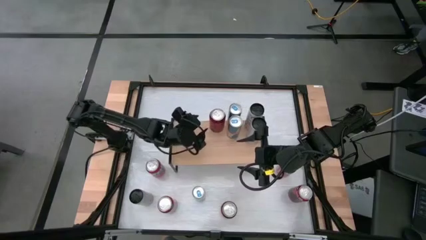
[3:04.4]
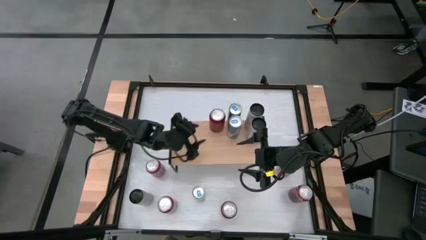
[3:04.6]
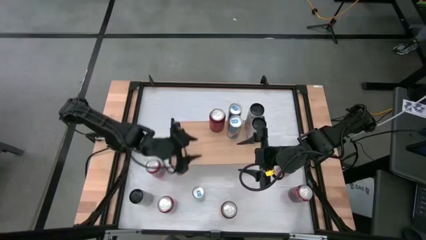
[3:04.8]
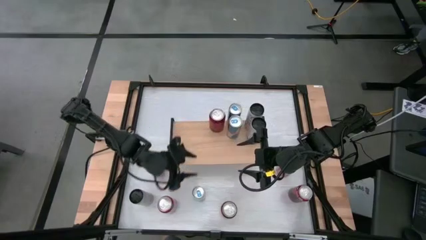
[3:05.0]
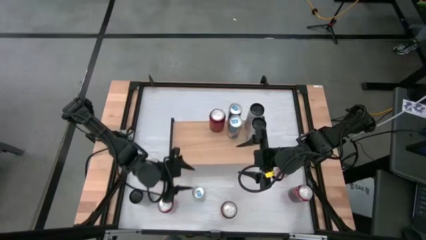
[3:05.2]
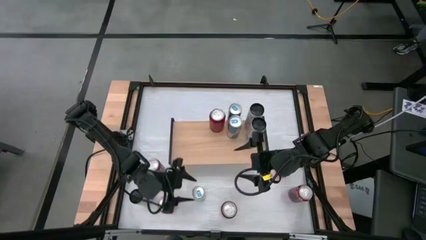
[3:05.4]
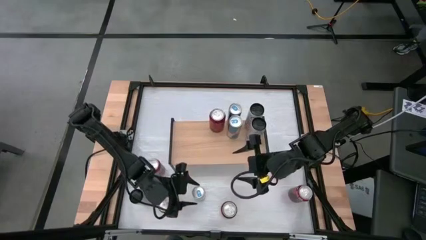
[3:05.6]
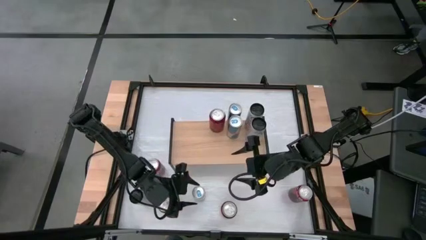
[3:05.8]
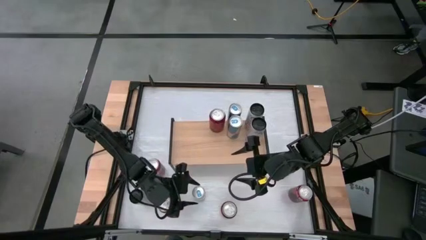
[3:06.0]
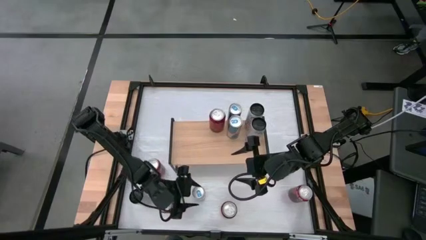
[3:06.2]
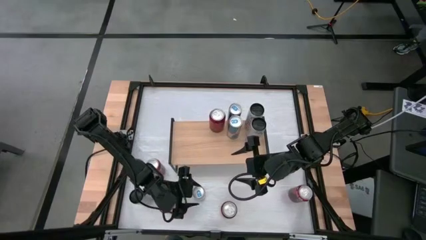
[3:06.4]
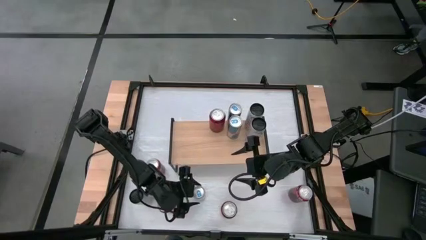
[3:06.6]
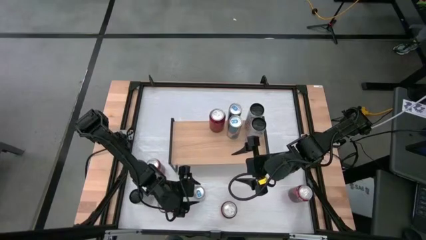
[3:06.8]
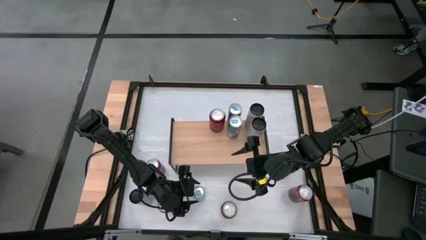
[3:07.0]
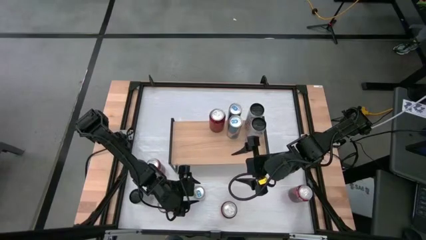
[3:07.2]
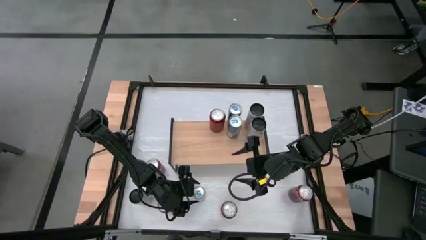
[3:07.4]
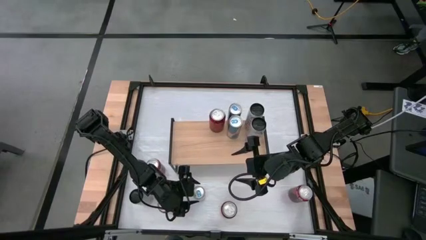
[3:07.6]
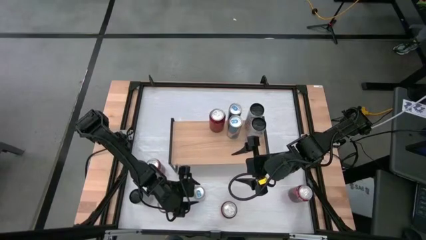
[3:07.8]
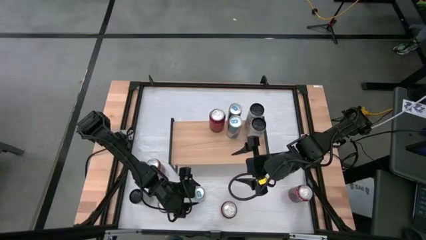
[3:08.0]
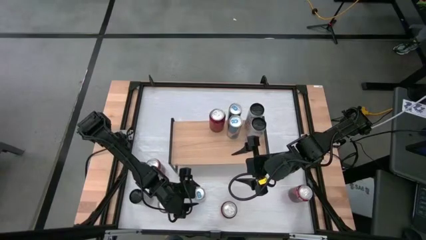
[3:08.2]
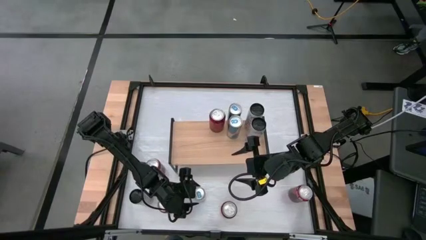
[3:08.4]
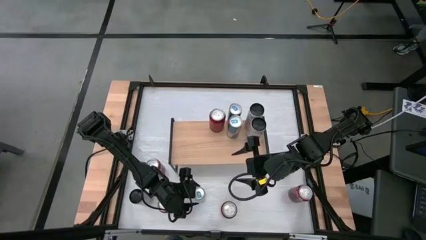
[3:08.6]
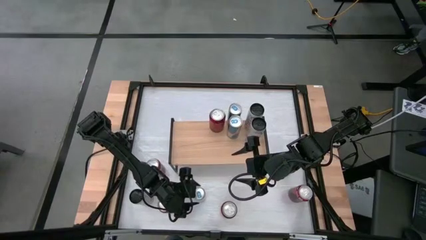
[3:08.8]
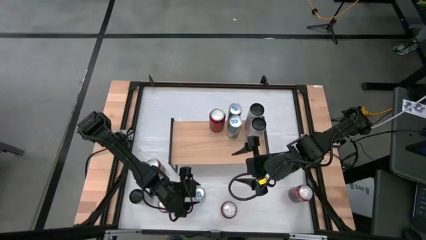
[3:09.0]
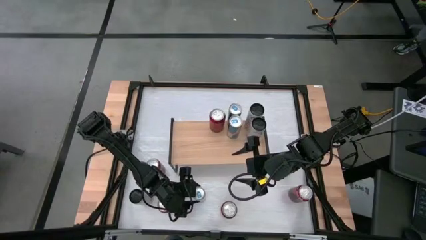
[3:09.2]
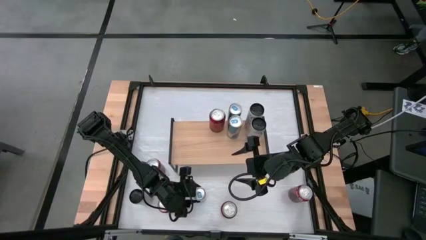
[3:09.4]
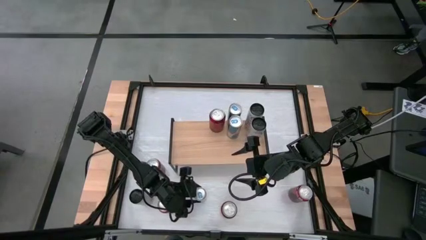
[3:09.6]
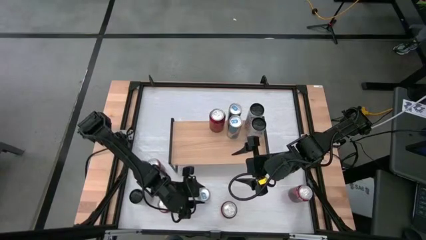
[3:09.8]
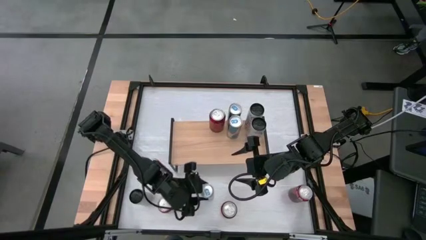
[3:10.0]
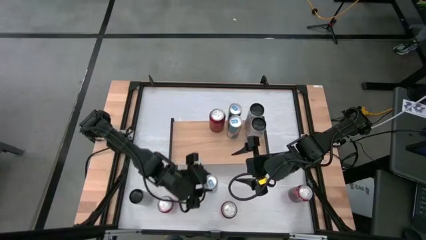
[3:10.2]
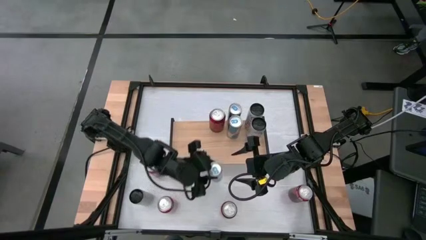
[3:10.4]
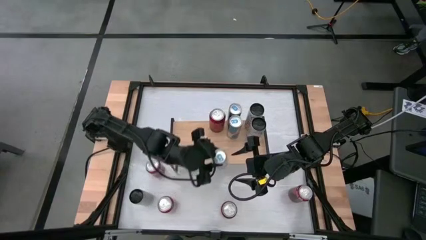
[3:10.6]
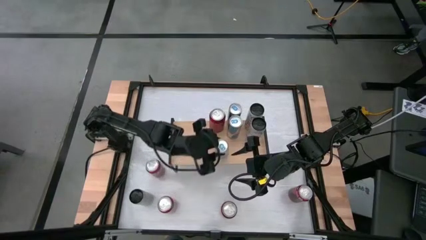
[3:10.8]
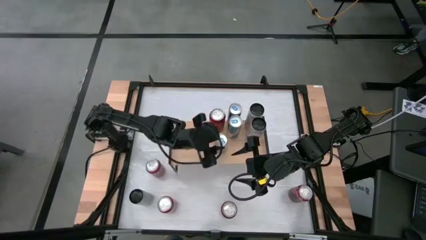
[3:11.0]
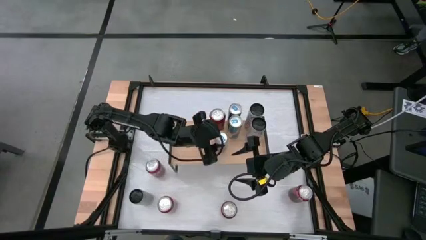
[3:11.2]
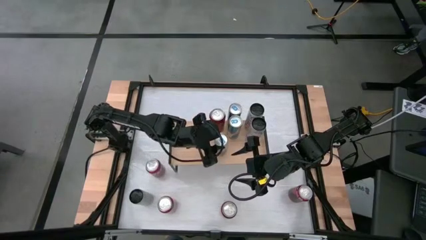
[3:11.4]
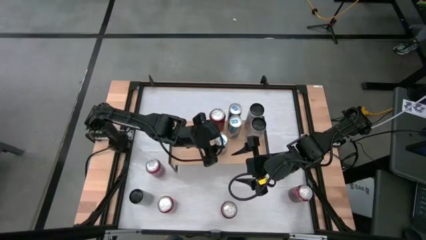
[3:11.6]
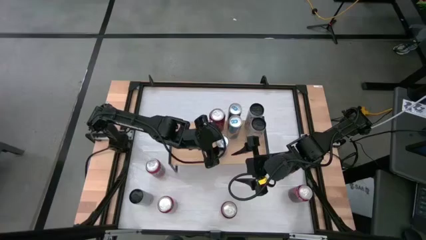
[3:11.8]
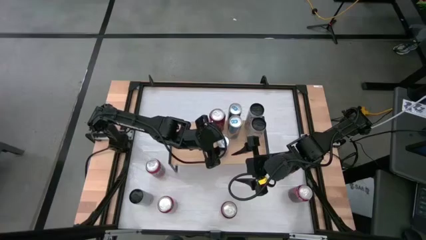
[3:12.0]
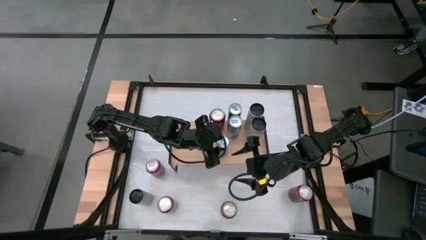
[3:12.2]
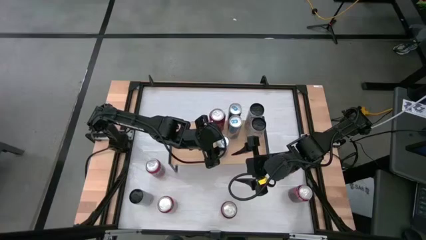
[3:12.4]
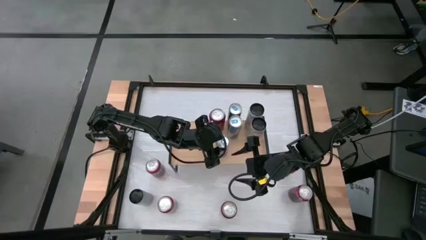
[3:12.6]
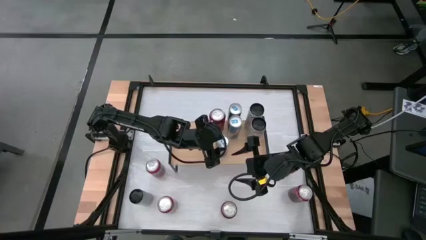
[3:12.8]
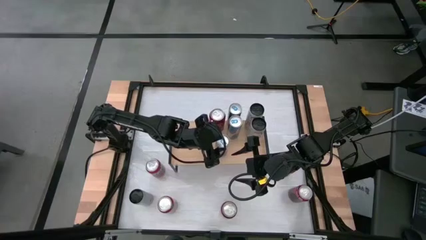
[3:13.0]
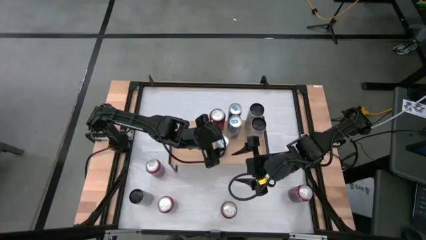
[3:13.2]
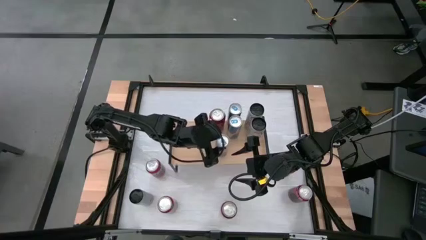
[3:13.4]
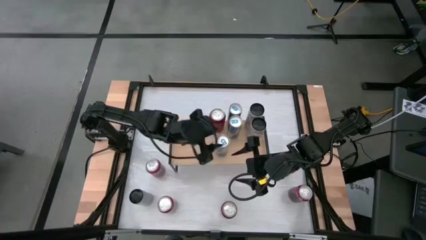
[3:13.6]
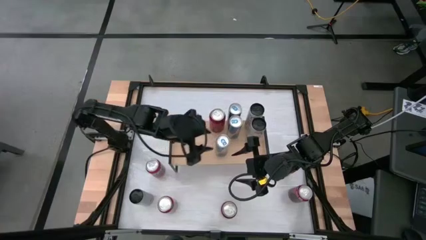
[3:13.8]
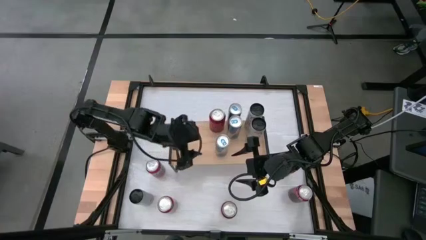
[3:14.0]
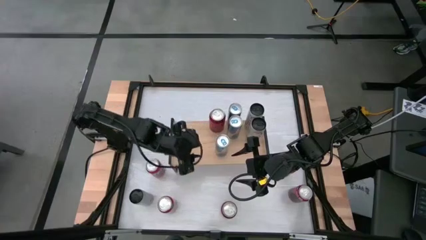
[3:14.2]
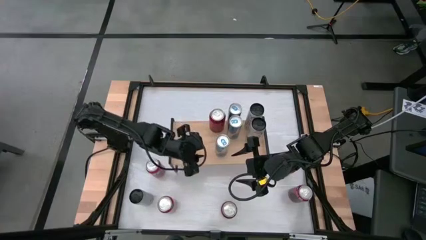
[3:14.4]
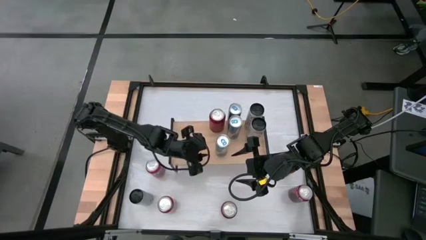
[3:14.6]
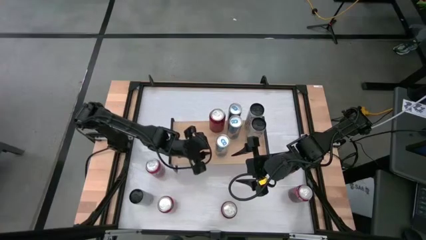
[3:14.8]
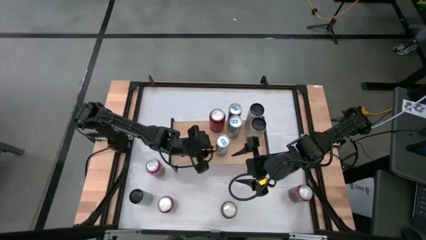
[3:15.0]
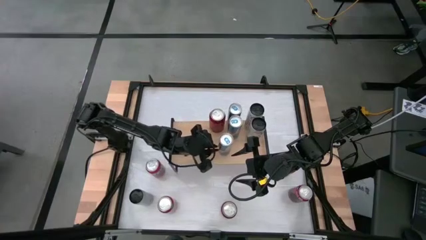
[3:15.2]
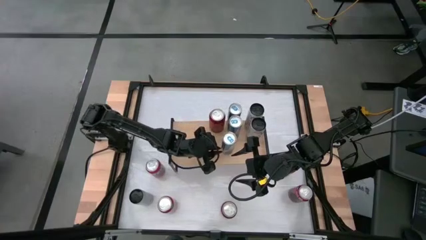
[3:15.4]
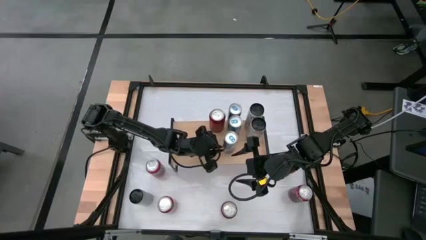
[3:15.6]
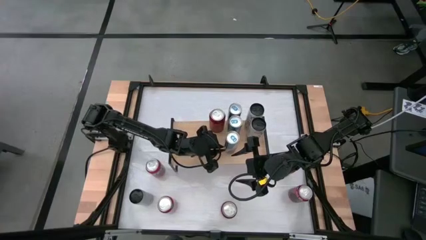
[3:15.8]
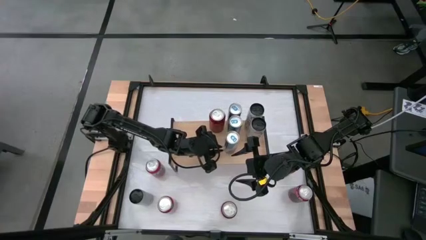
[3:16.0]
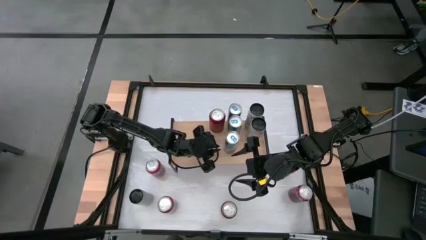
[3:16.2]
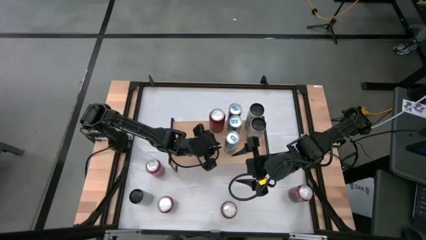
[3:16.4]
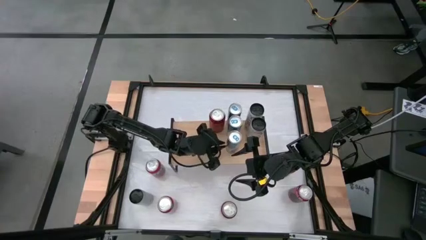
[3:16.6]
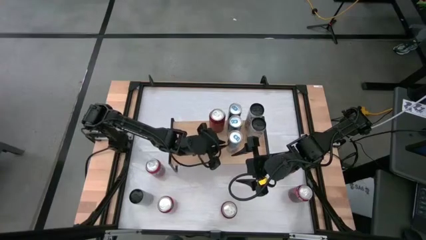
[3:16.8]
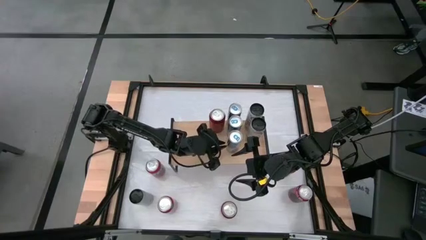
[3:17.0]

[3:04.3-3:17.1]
Task: Place canned beverage on shelf
Put the blue soda can on the shelf aligned with the other blue soda cans

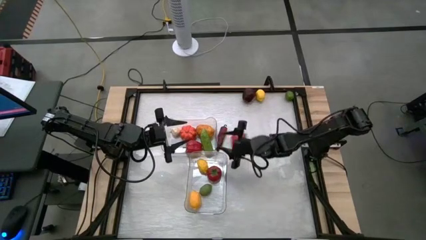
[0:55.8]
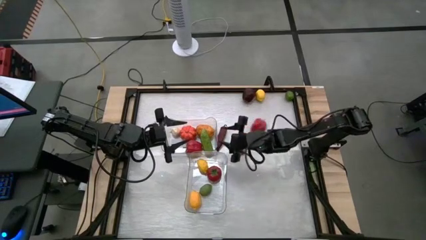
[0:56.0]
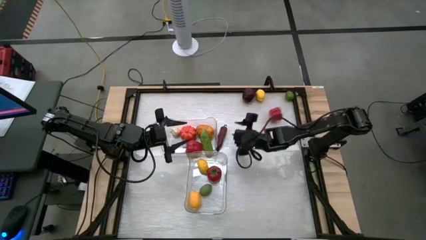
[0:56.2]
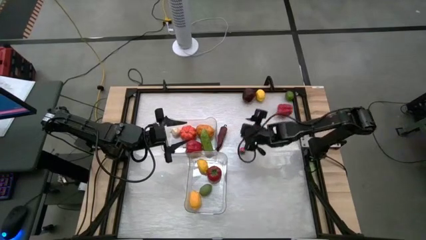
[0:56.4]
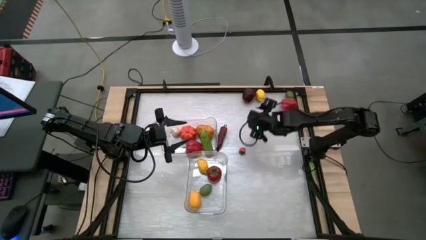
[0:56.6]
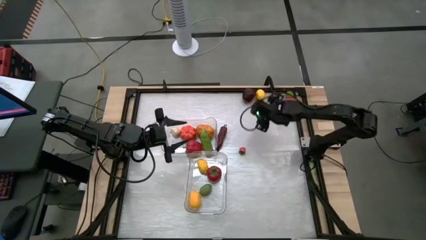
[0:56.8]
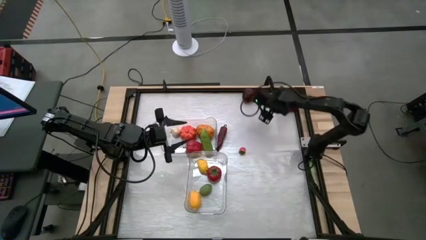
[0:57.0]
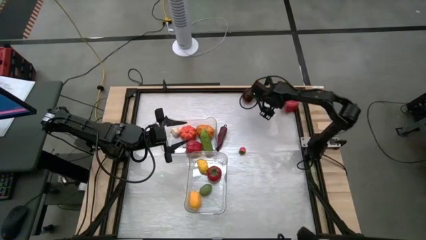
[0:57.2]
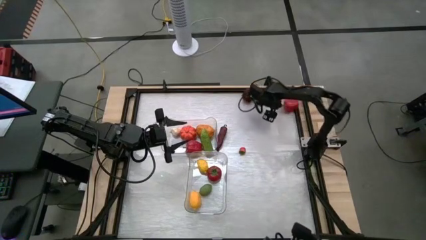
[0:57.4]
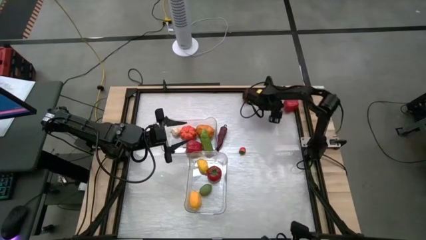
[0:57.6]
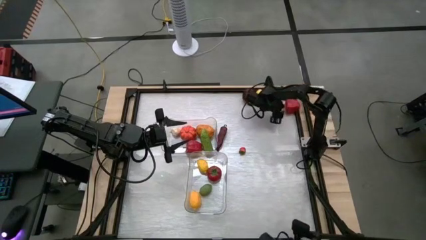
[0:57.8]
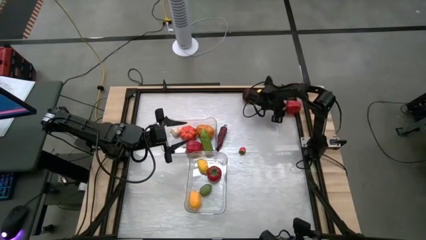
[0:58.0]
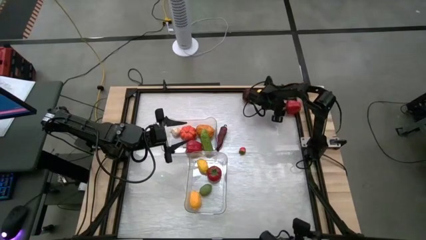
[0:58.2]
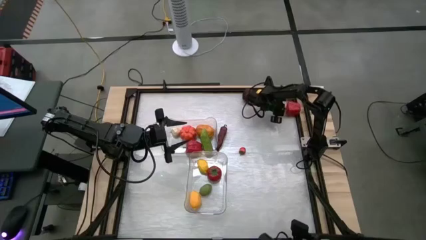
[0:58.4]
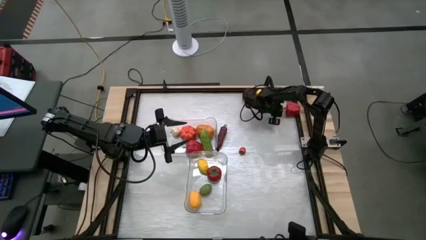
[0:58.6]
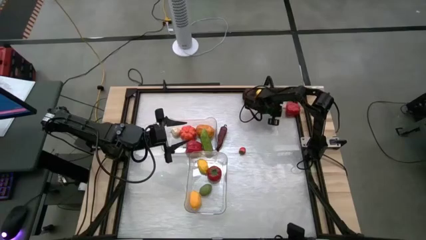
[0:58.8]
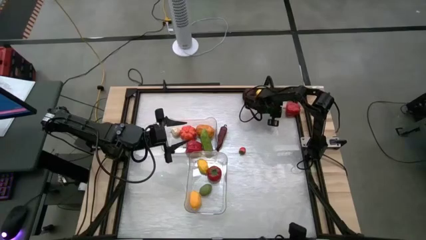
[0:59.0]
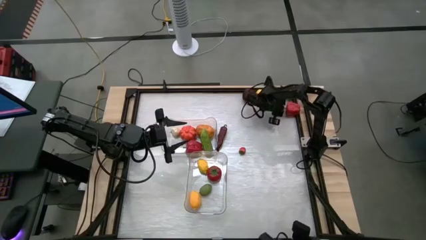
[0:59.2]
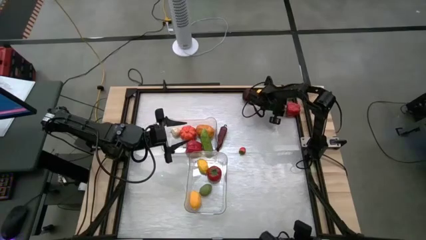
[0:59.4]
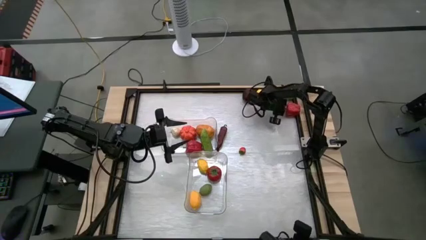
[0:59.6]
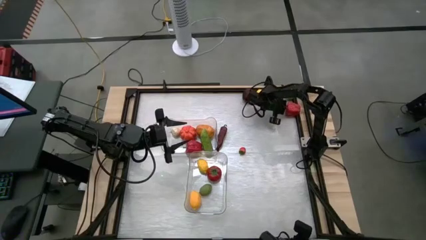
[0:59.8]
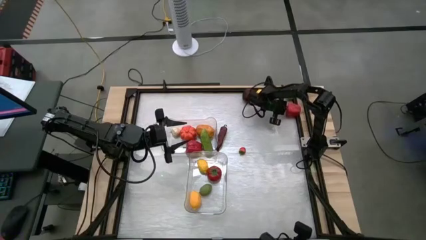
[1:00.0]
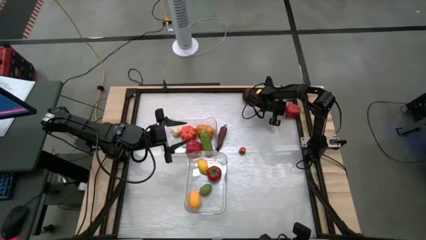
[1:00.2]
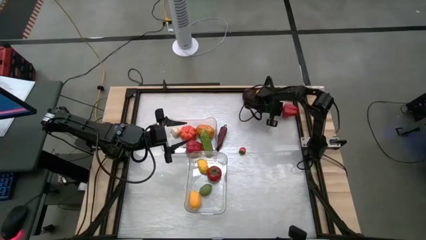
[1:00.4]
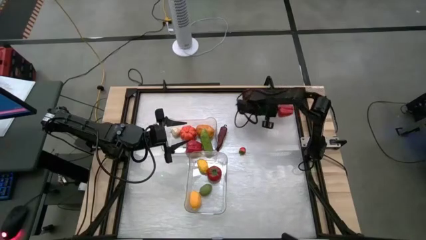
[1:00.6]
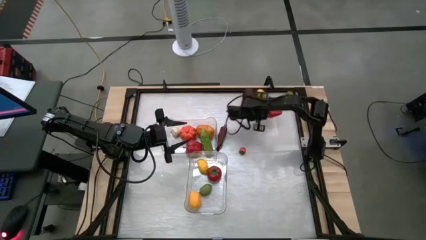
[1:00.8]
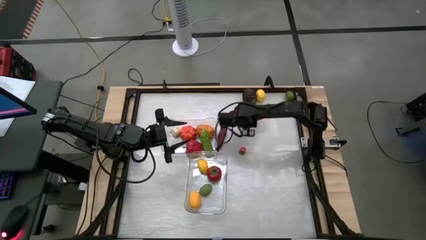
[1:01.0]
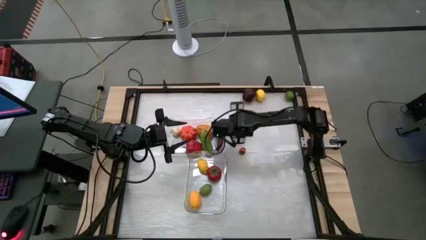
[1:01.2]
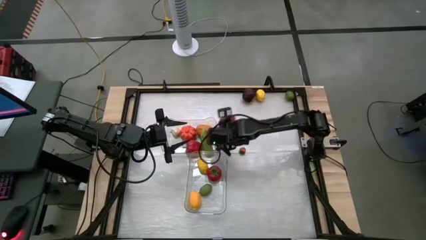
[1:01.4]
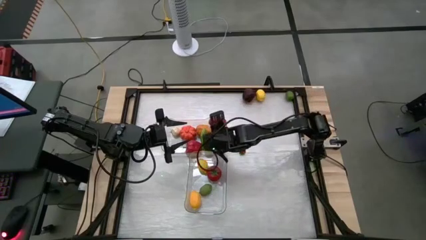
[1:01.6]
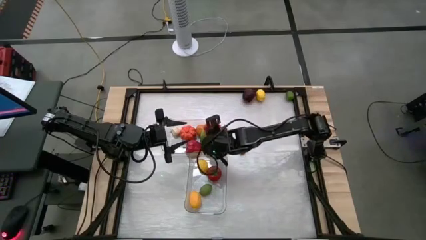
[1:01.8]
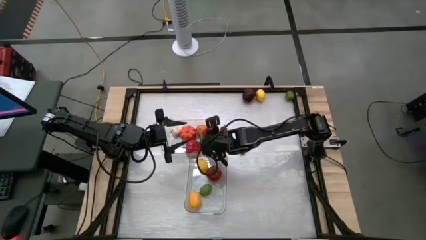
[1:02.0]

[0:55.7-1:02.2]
Task: Sort produce into baskets
Put the red bell pepper into the top transparent bin
